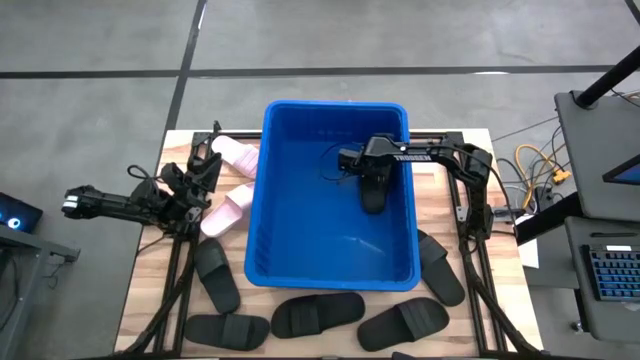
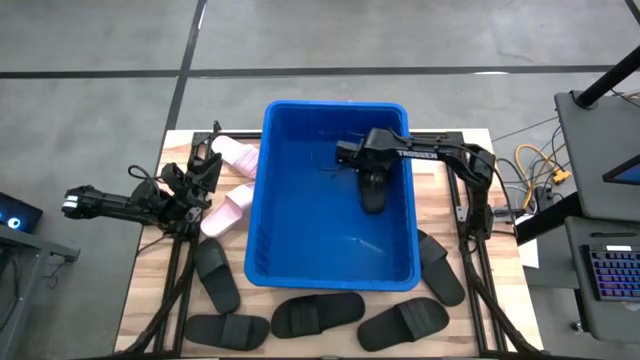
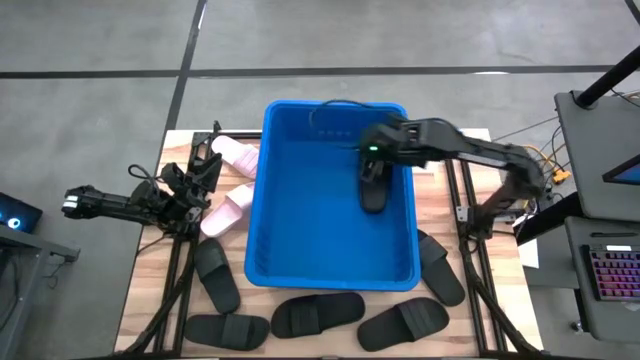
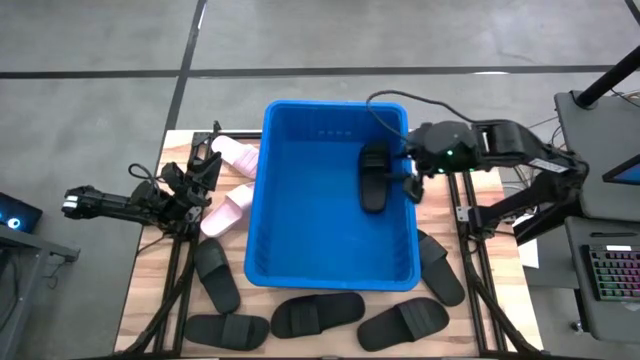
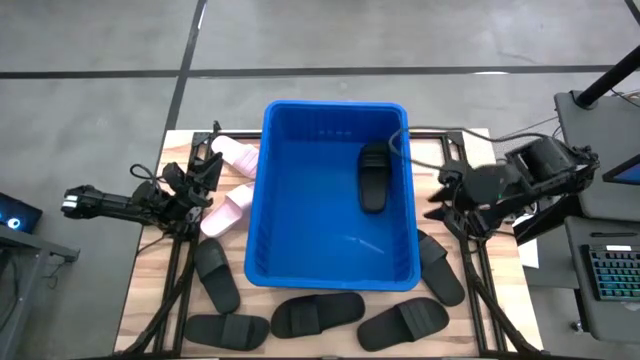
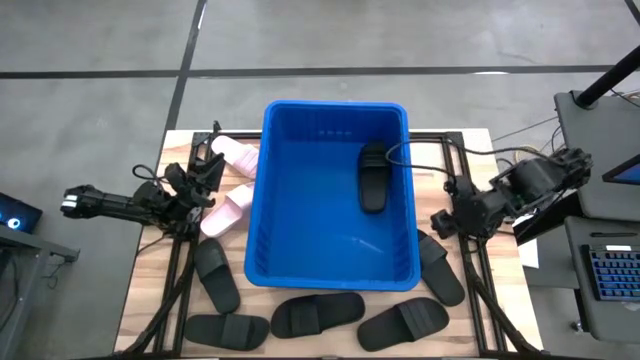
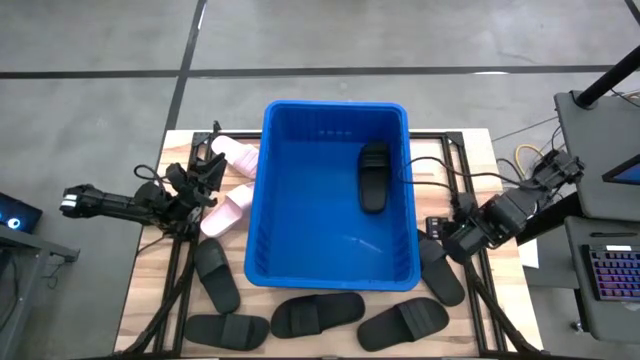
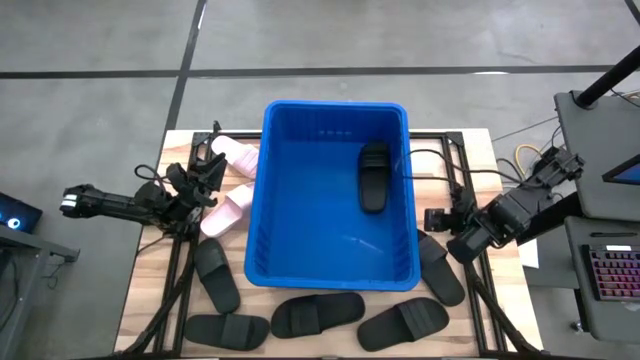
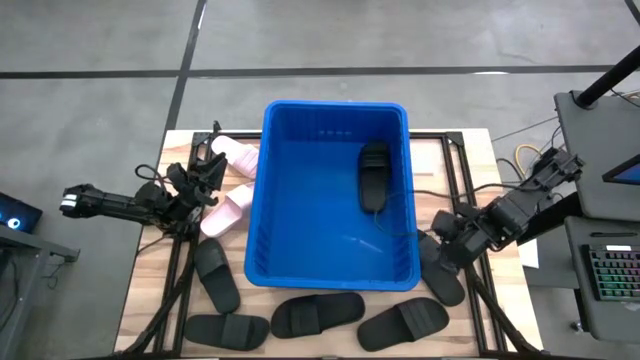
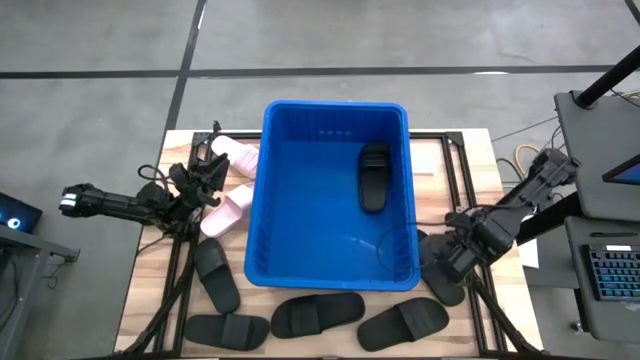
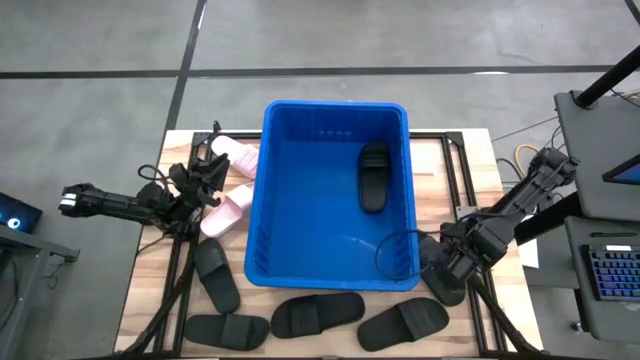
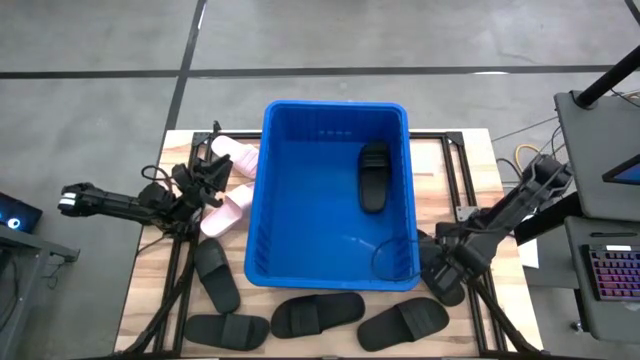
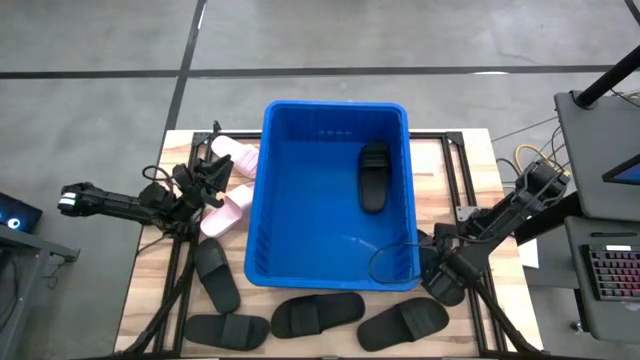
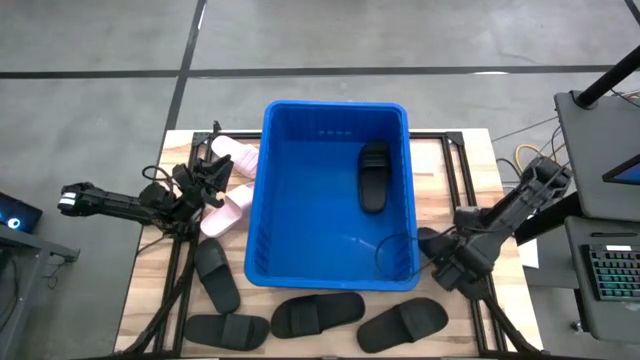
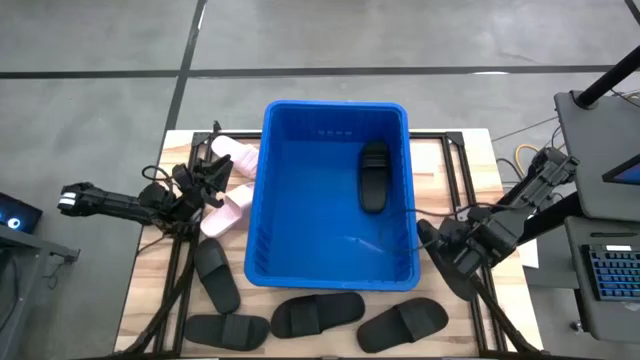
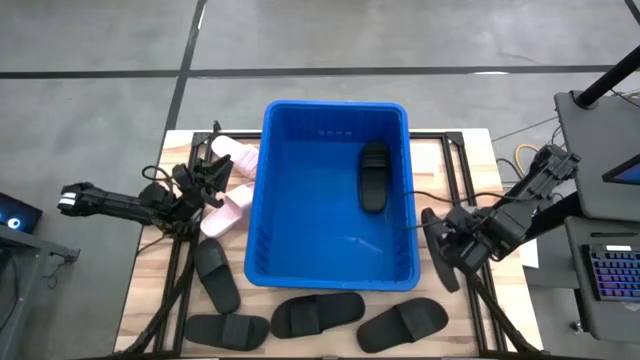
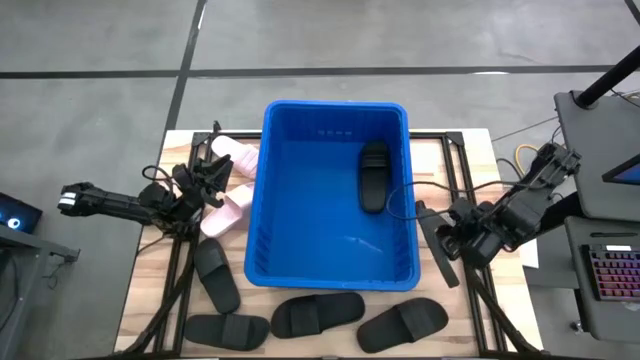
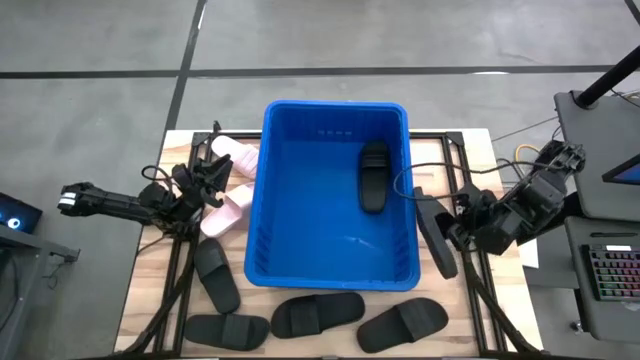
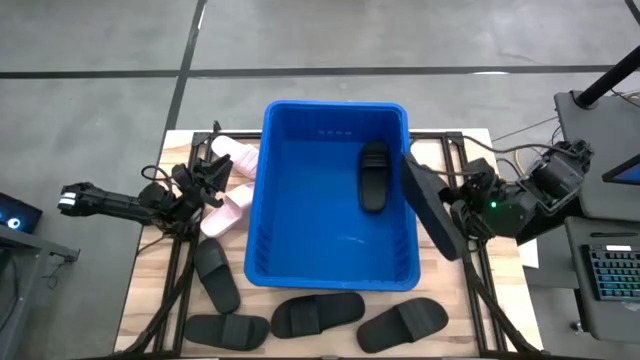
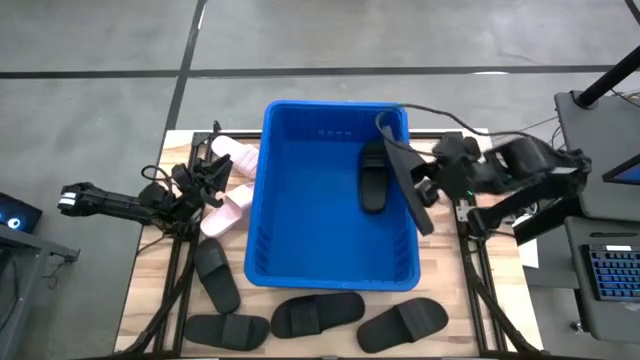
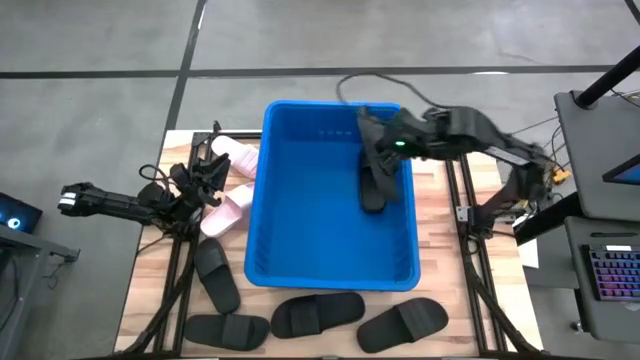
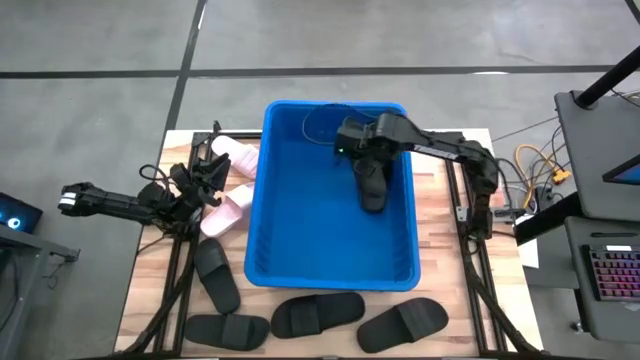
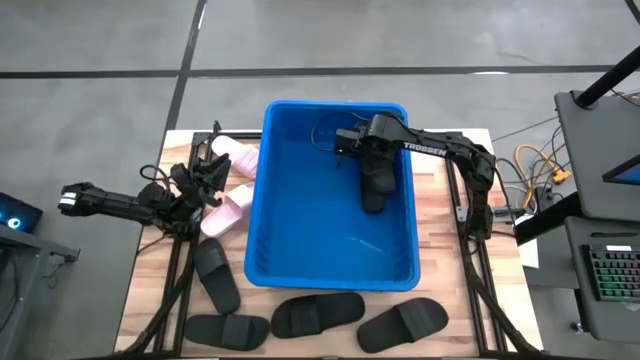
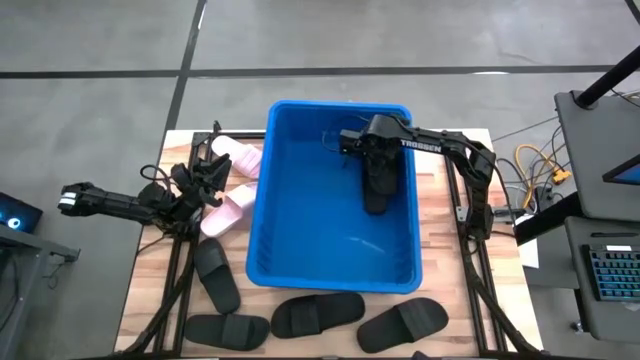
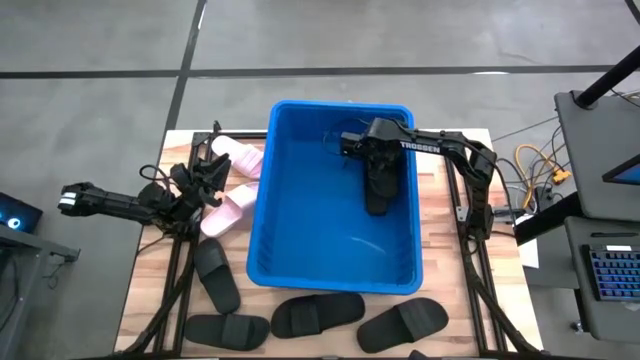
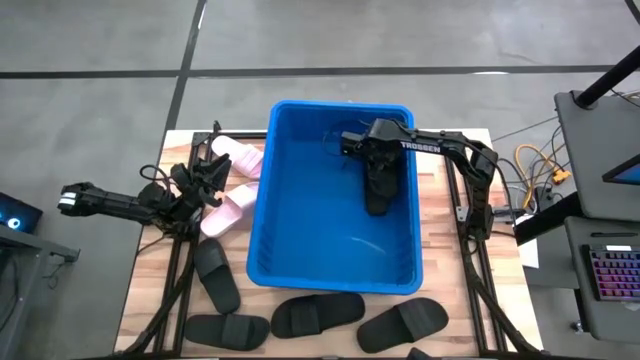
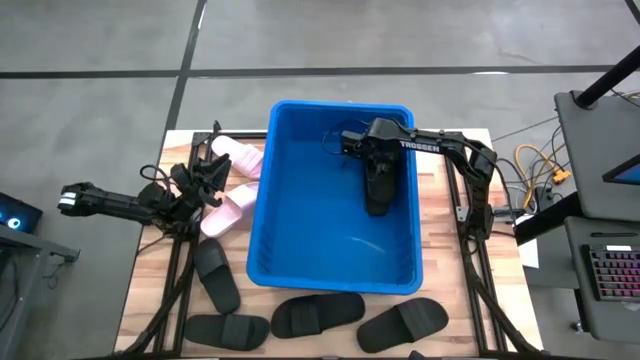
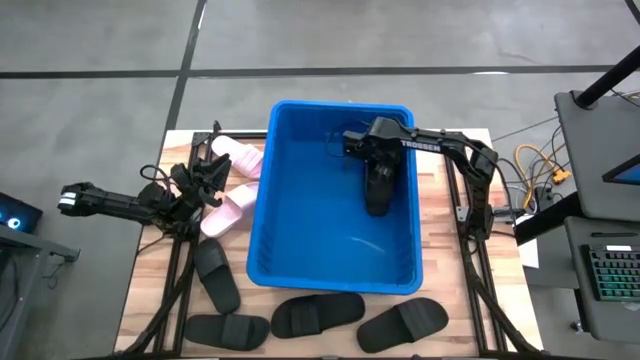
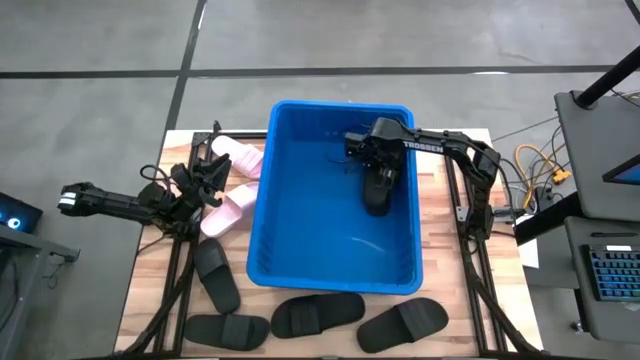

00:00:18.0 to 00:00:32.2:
Task: Pick and place slides into bin
Put the black slide into the blue bin

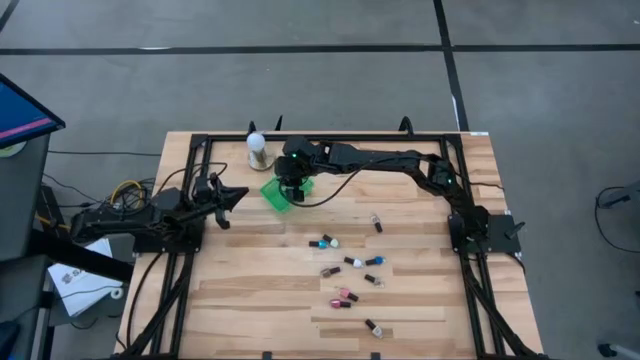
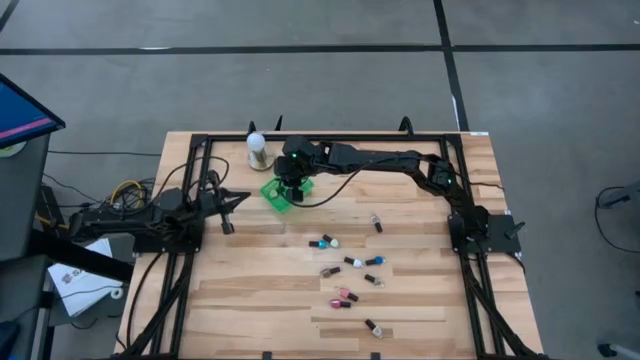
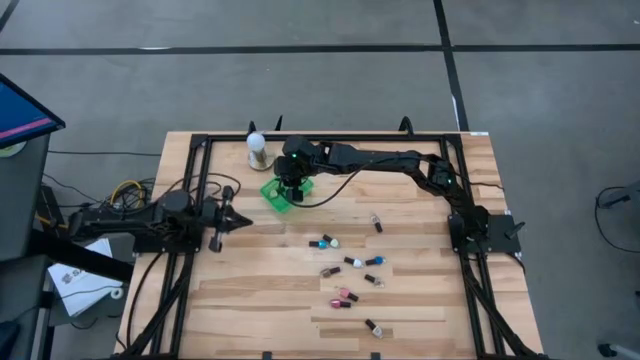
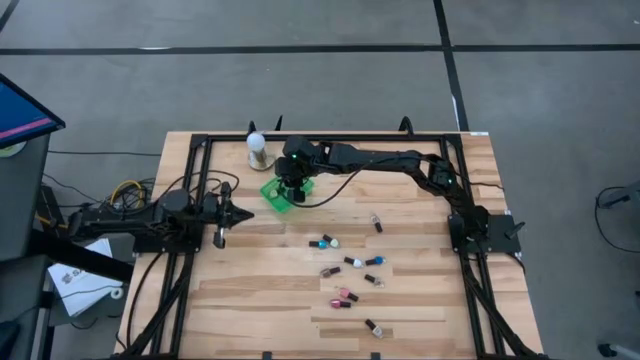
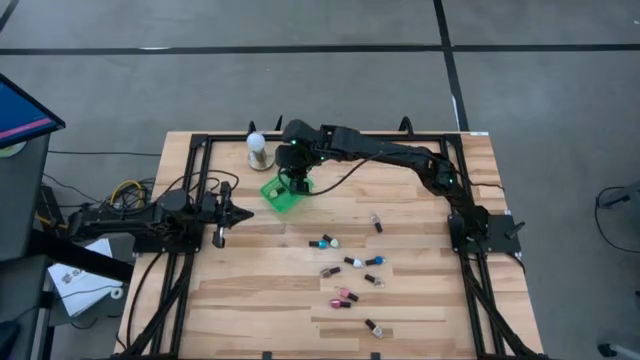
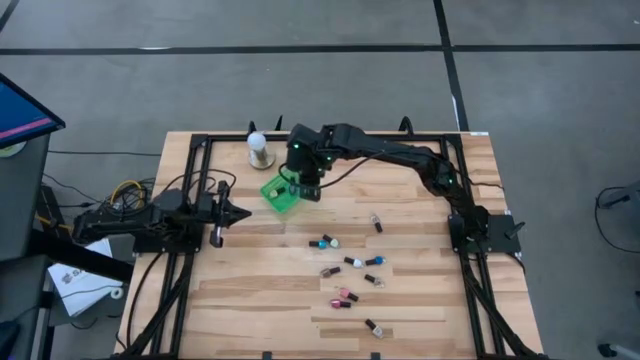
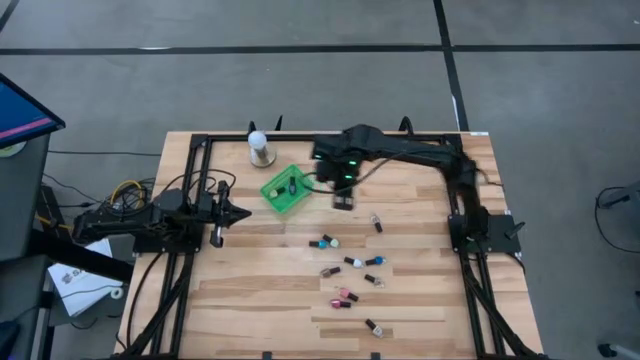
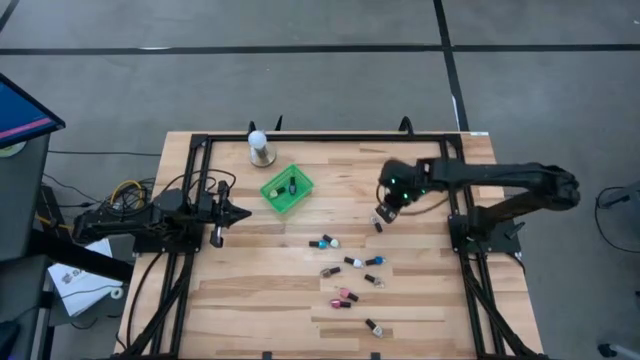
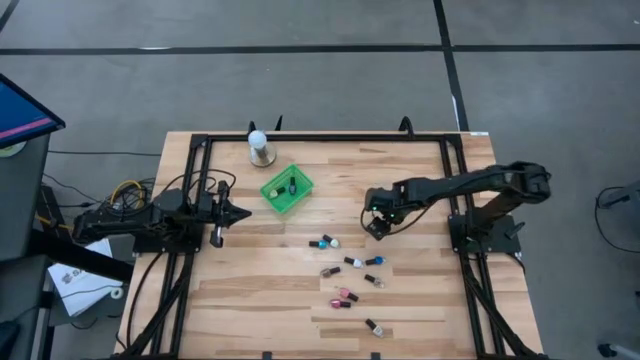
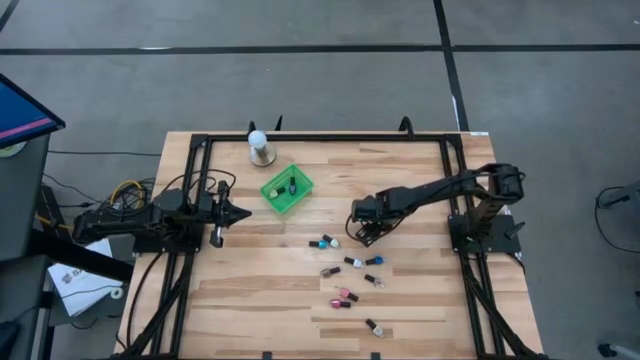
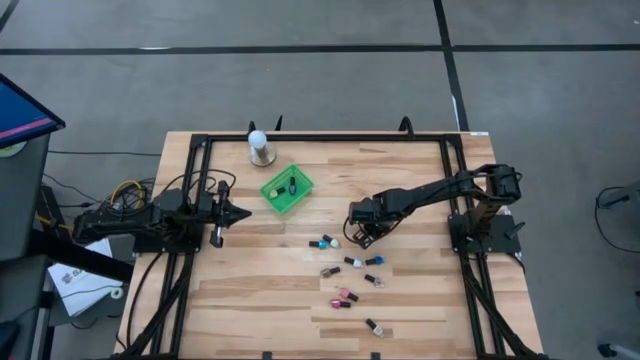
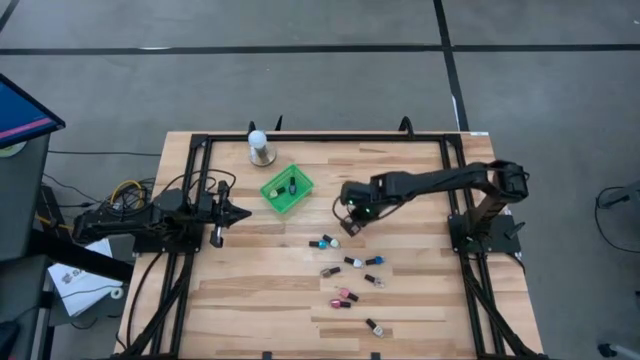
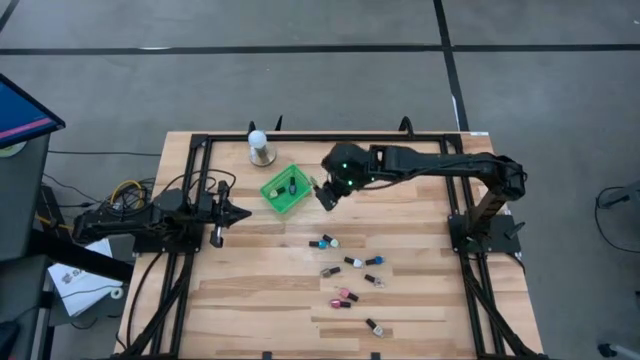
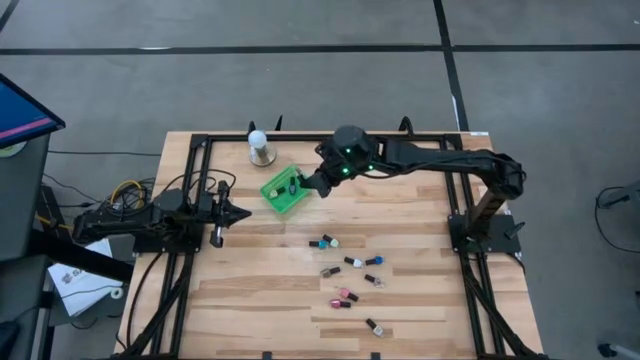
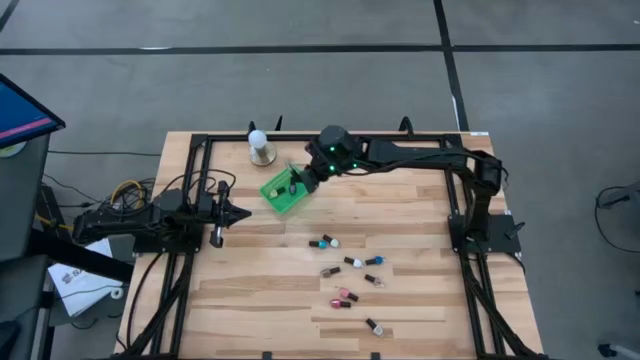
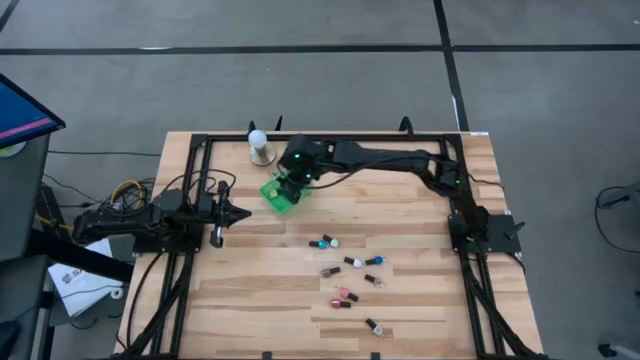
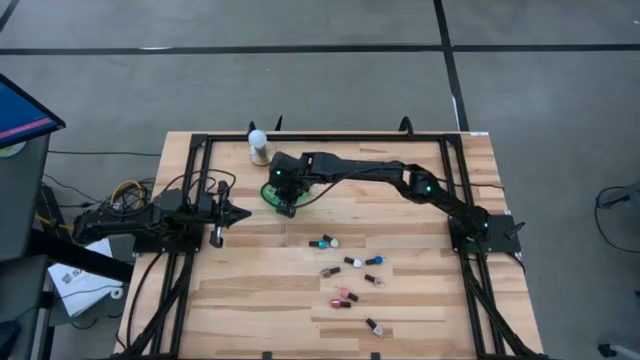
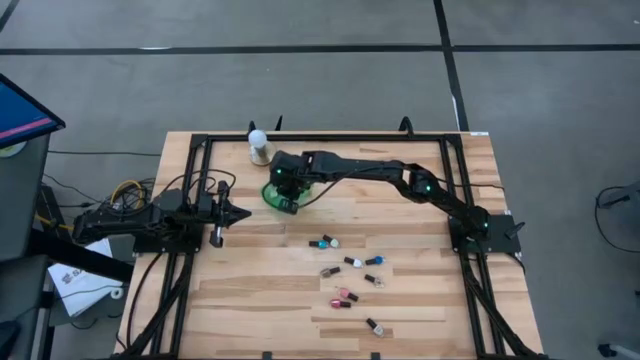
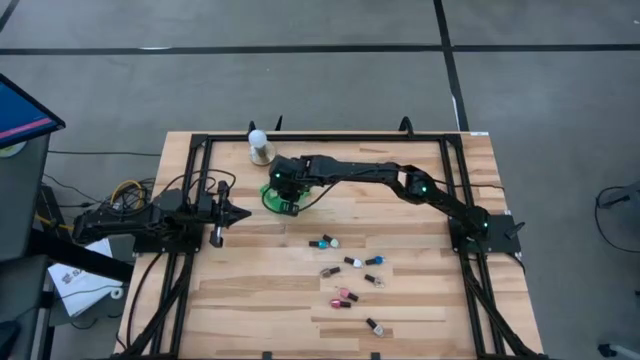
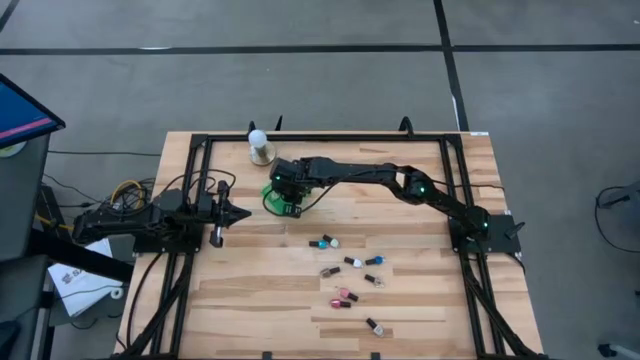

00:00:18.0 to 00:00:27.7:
Task: Pick & Place Nail Polish
Put the top transparent nail polish bottle into the green bin
